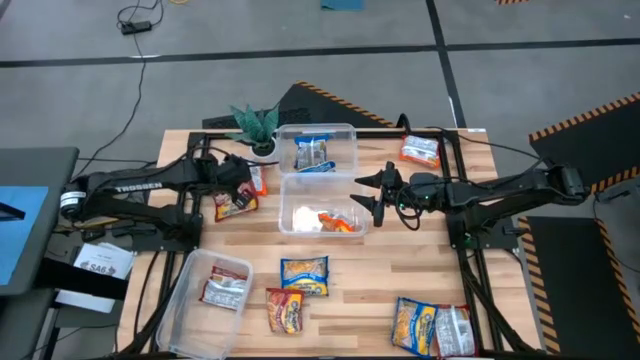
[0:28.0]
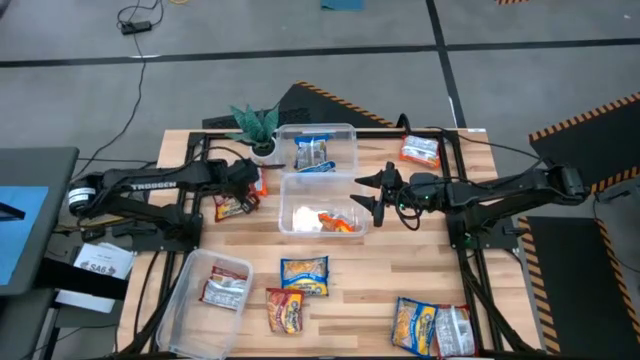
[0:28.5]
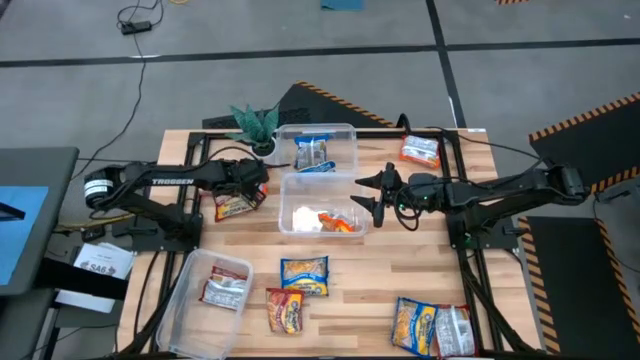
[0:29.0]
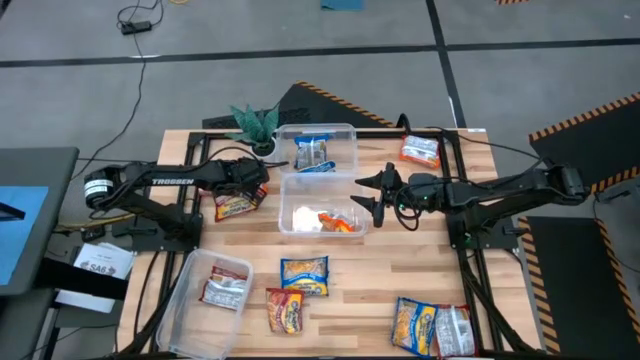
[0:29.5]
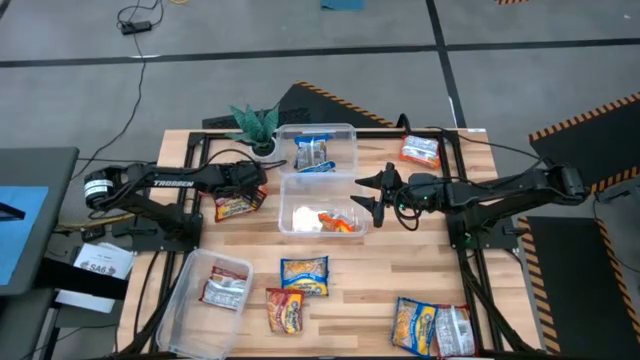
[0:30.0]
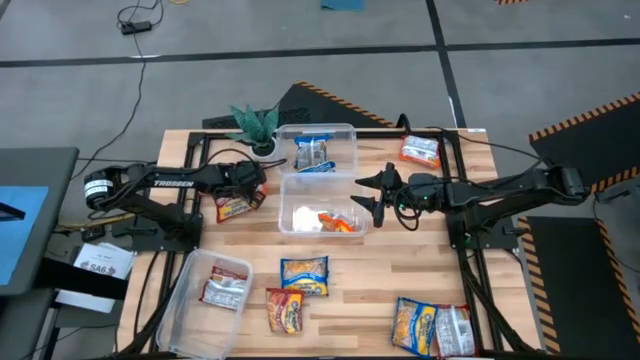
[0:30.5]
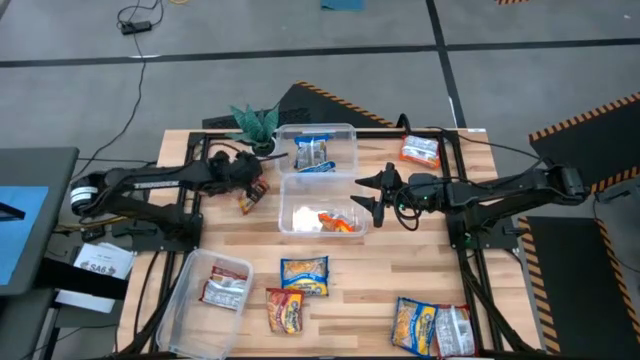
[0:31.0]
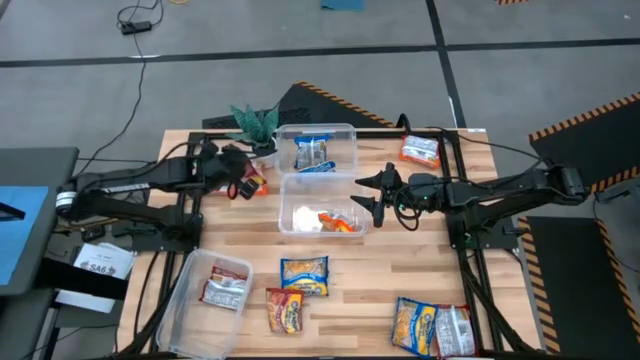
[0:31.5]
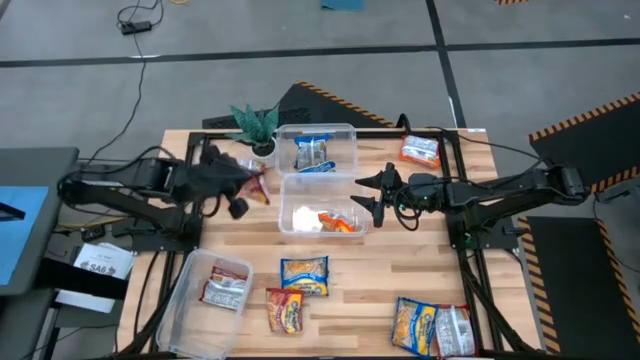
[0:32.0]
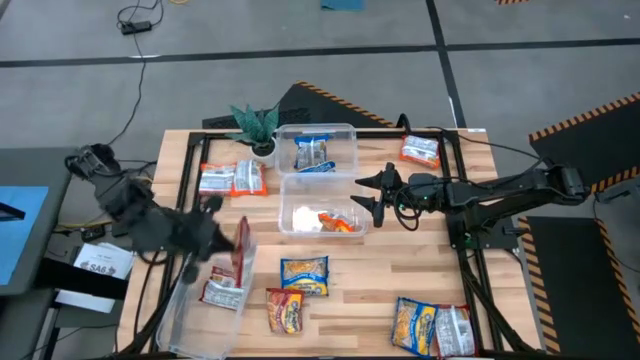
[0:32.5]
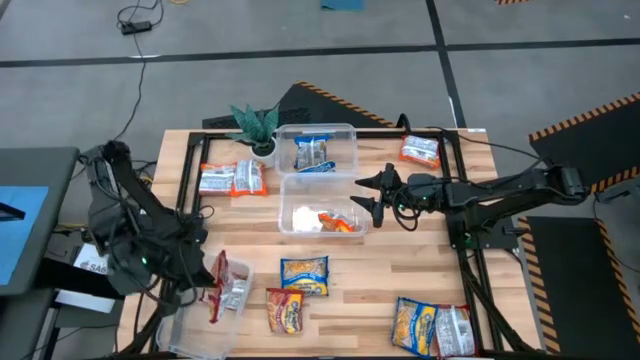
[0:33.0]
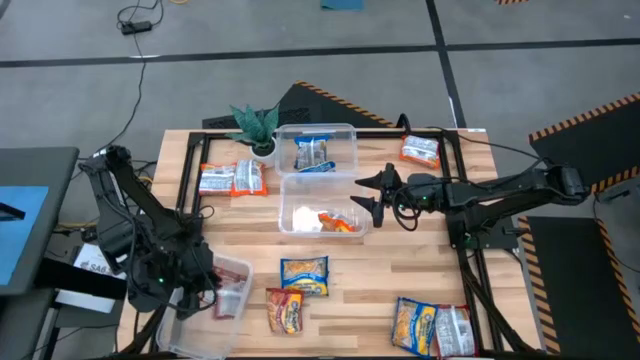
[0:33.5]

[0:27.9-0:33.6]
Task: Sort Maruchan noodles
Put the red noodle pack into the bottom transparent bin

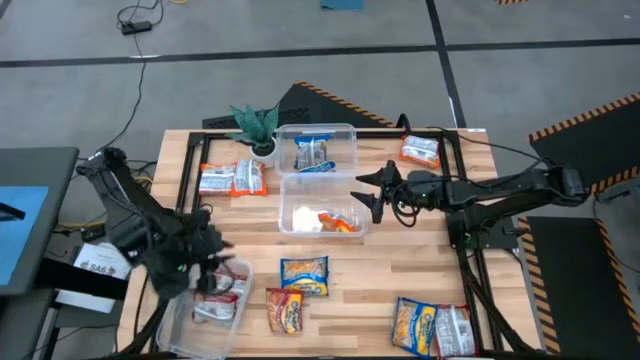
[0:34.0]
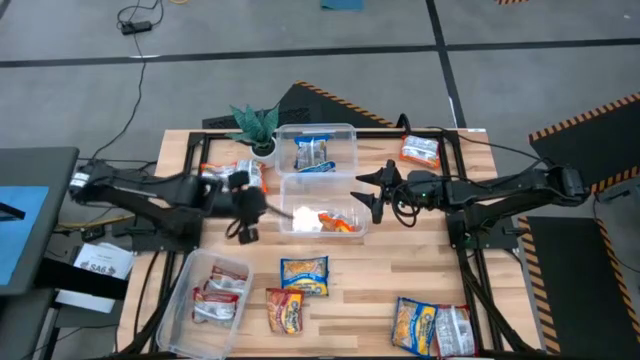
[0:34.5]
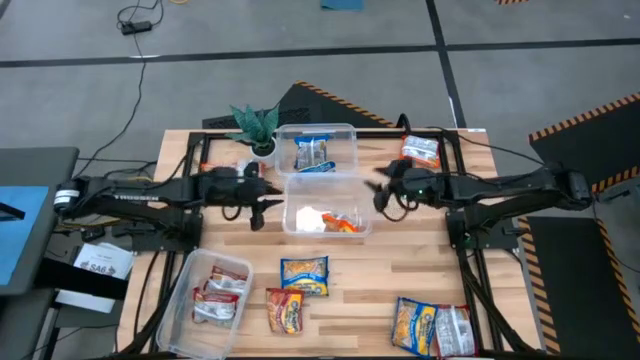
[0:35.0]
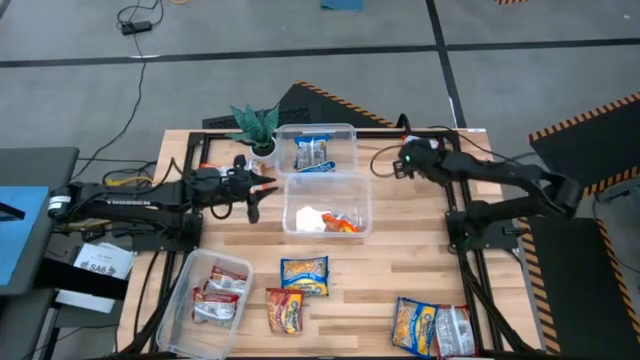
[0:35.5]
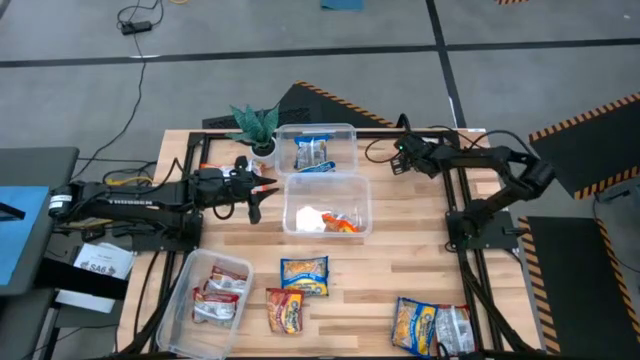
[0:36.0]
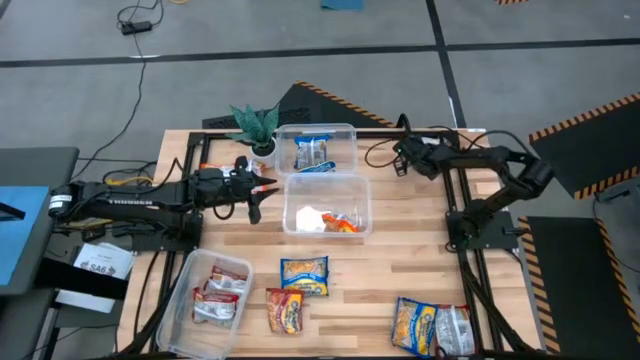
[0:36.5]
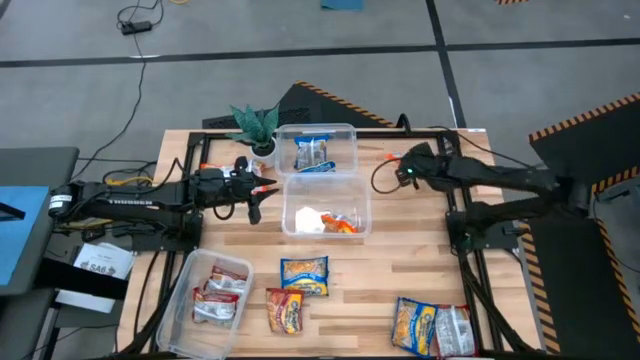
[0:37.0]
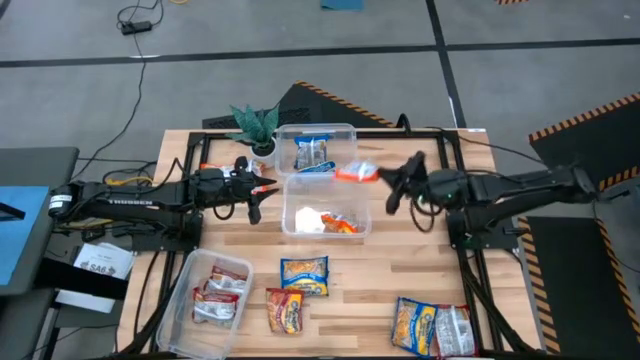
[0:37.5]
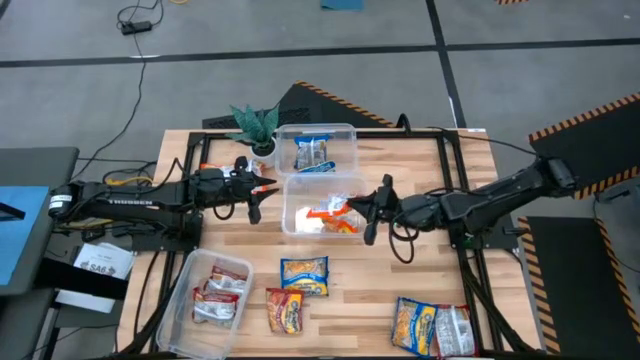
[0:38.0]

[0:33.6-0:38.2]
Put the orange noodle pack into the middle transparent bin

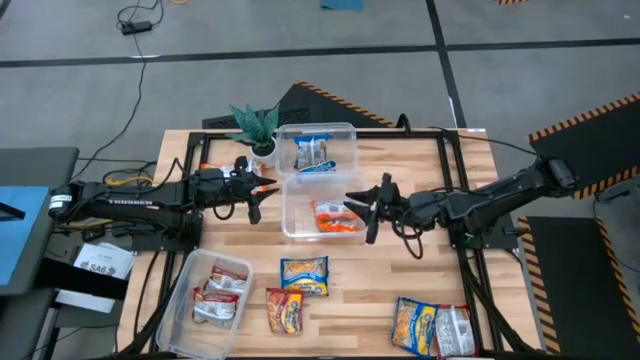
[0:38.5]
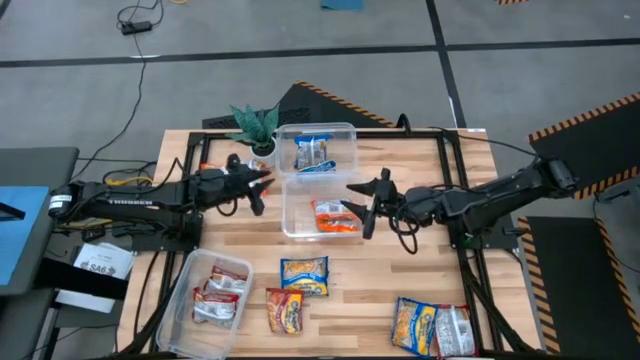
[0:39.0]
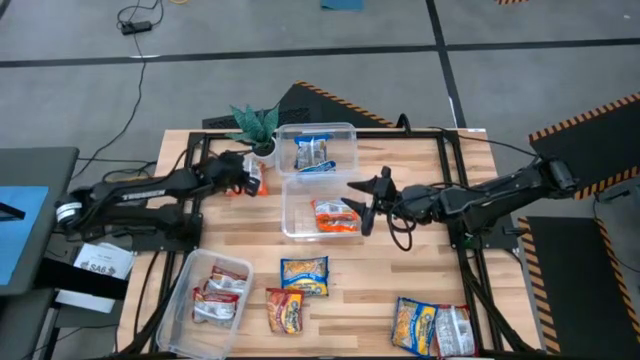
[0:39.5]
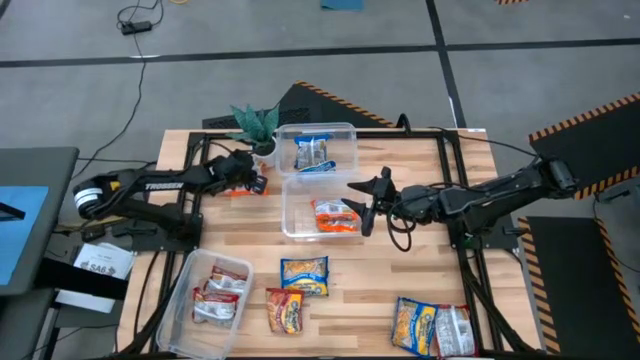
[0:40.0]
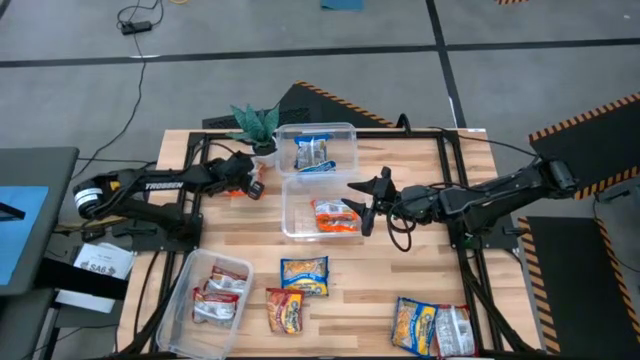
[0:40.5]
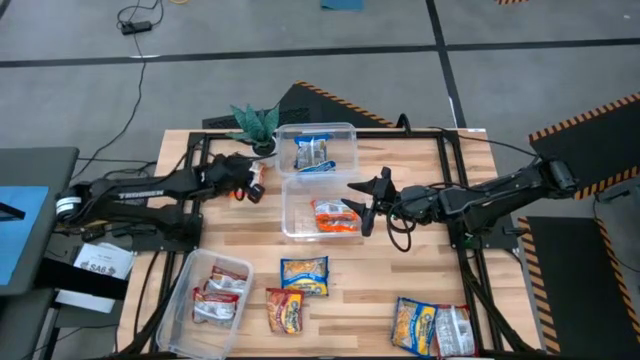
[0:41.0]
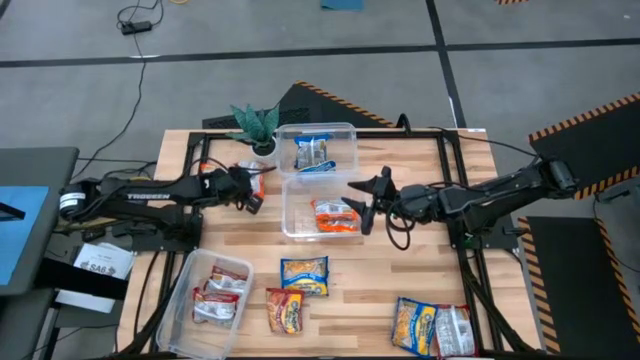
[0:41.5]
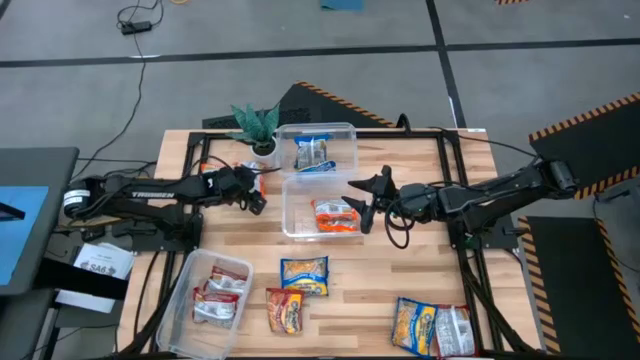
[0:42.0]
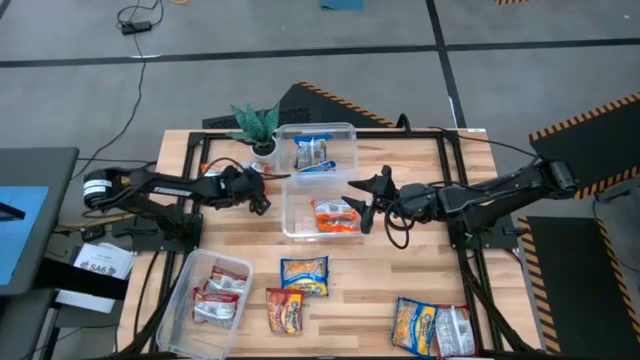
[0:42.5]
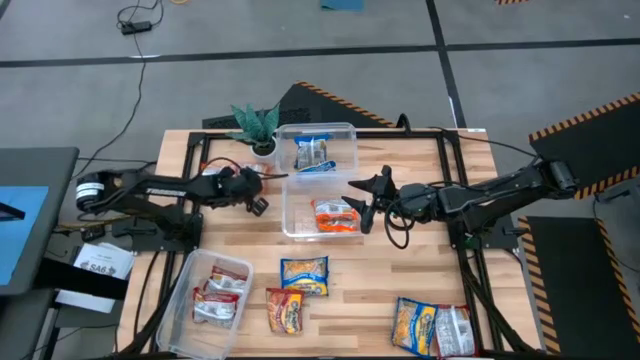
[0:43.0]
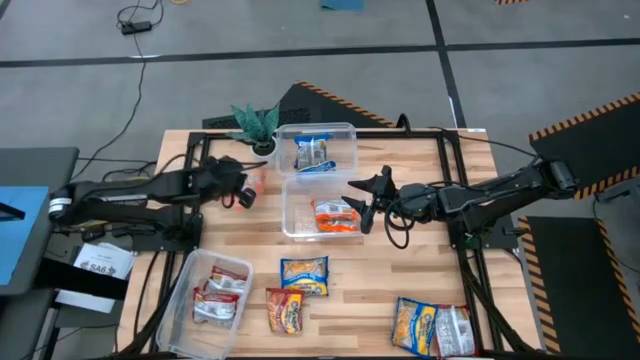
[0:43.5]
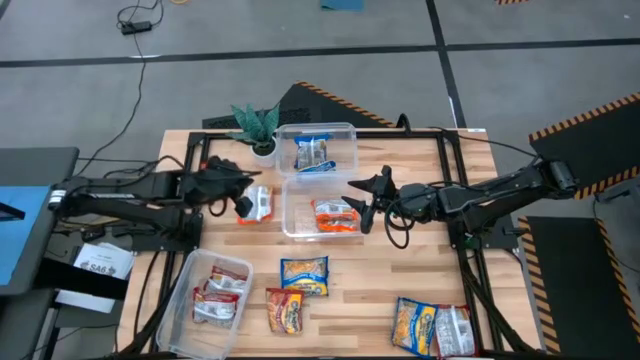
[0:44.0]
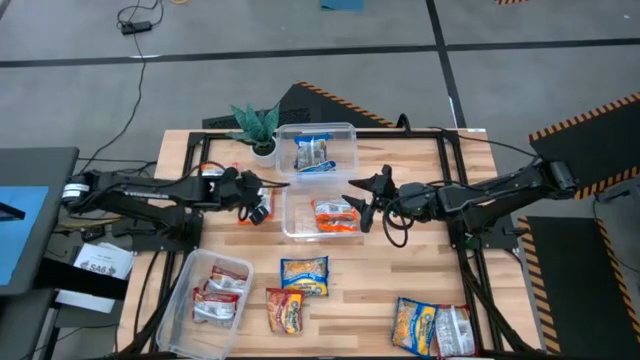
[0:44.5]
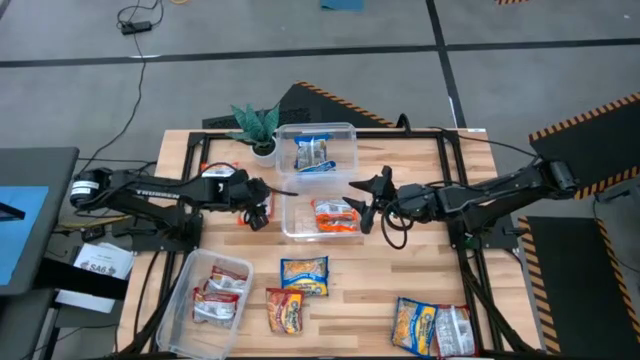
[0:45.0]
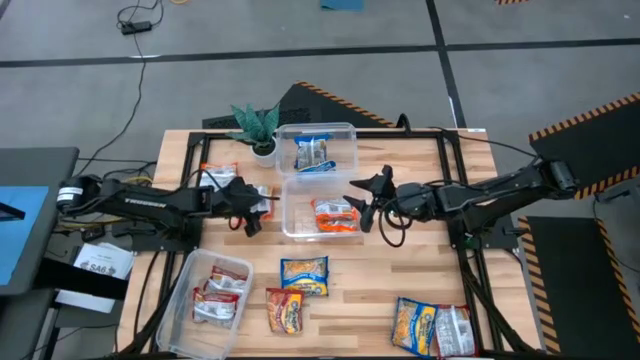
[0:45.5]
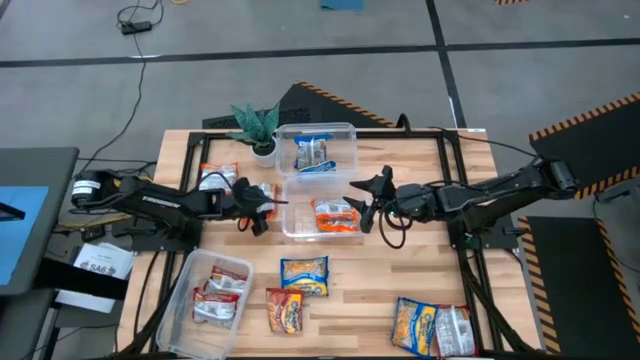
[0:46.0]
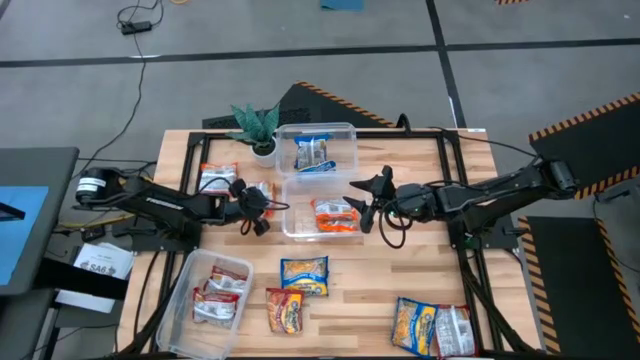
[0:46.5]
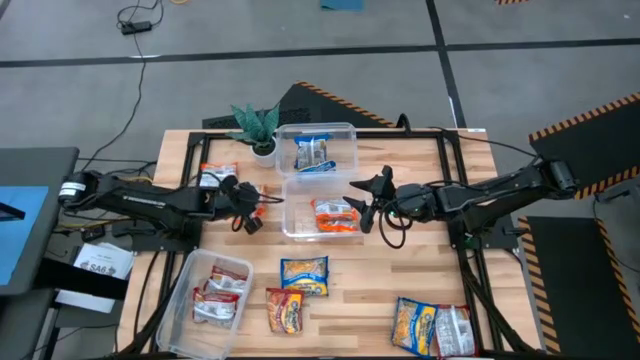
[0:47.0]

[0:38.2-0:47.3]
Put the orange noodle pack into the middle transparent bin

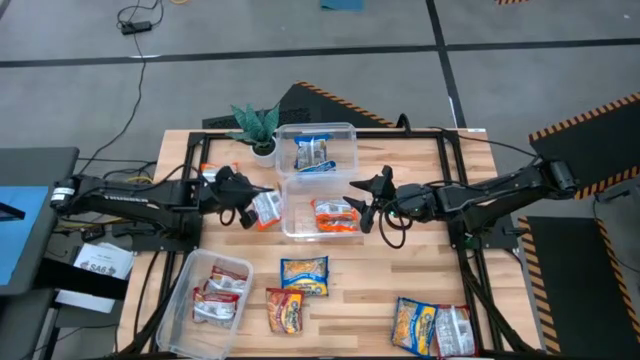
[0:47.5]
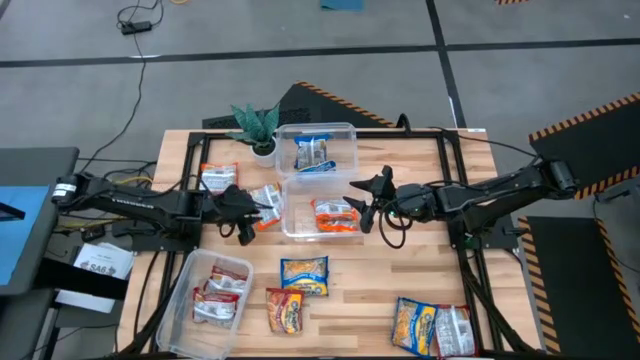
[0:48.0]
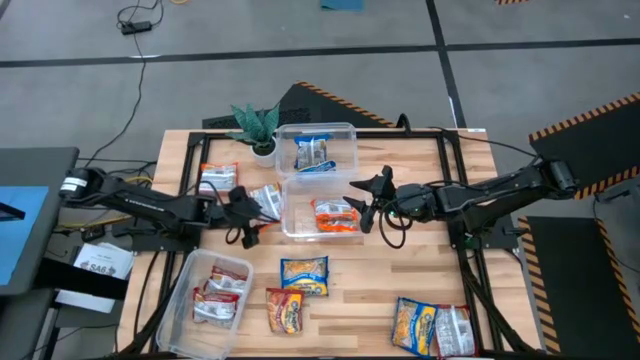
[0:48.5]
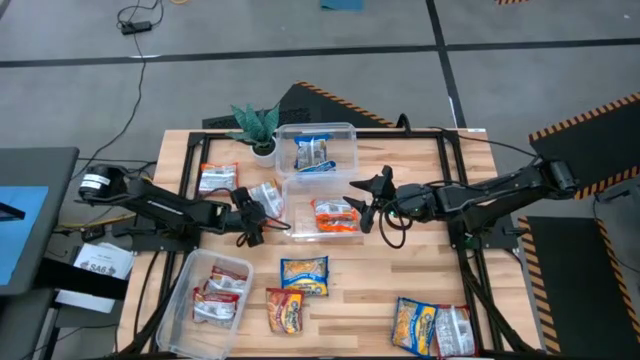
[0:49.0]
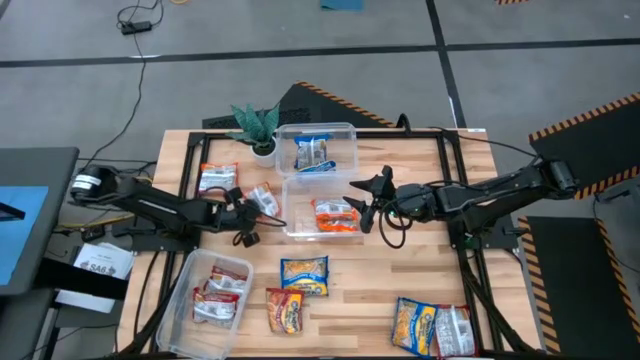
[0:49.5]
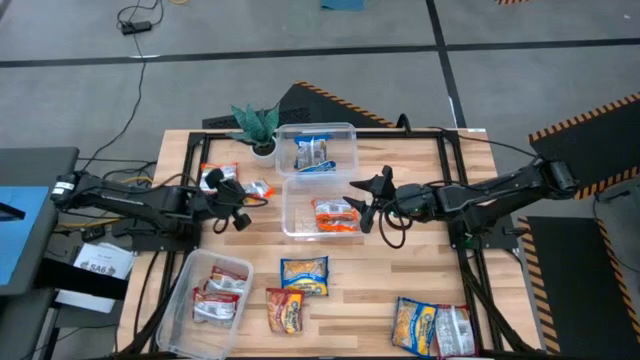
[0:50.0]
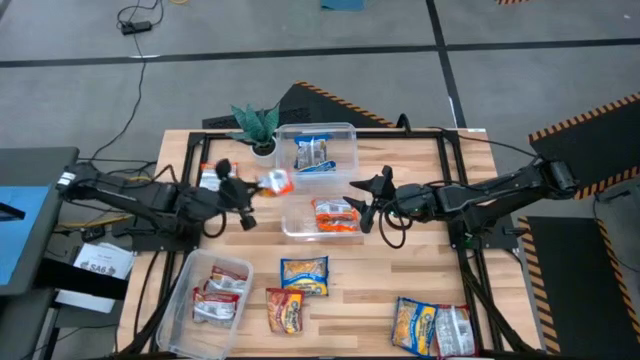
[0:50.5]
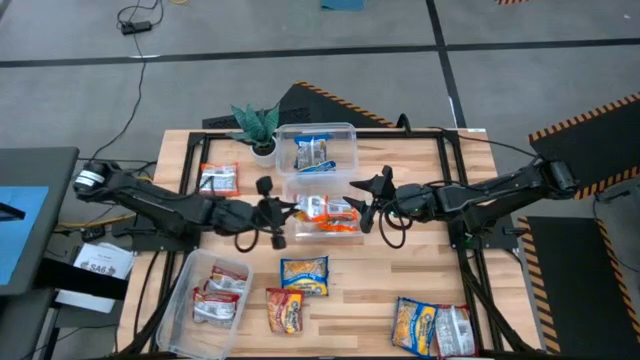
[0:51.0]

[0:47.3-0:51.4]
Put the orange noodle pack into the middle transparent bin
